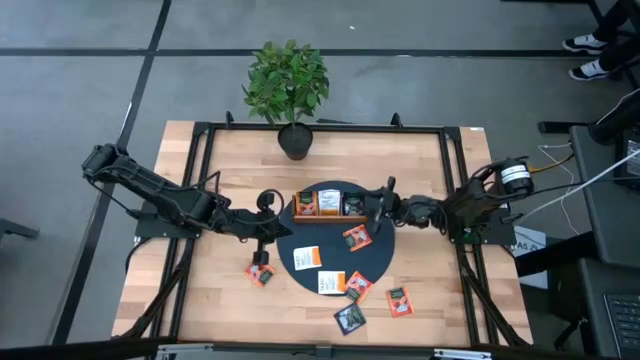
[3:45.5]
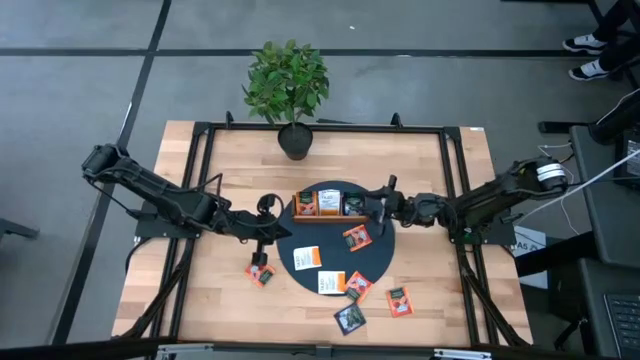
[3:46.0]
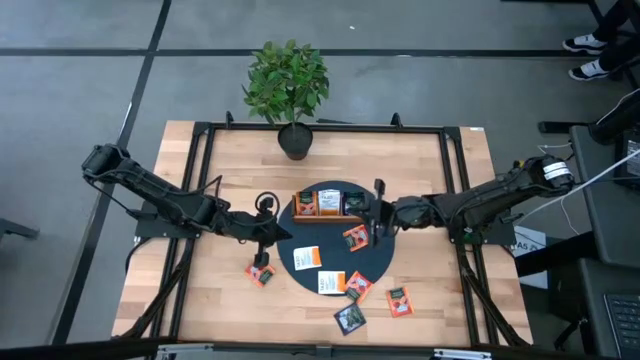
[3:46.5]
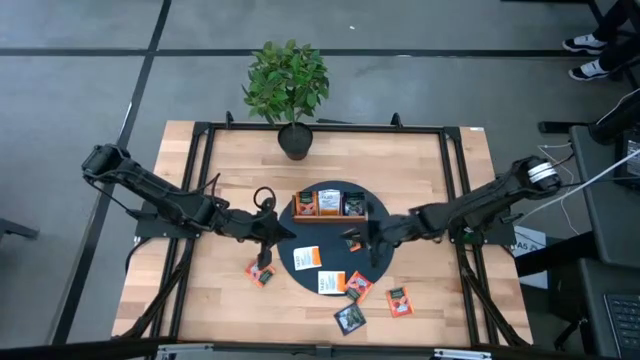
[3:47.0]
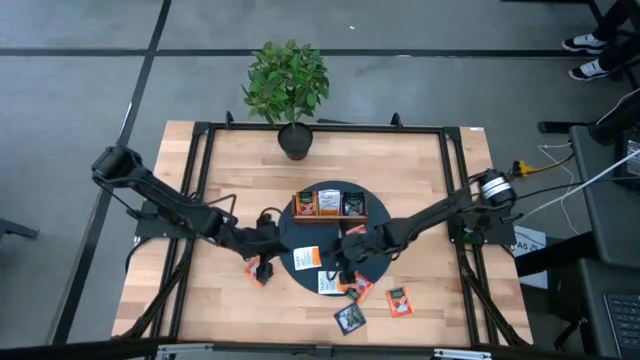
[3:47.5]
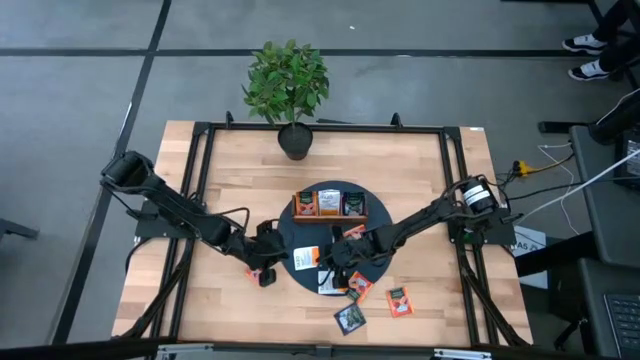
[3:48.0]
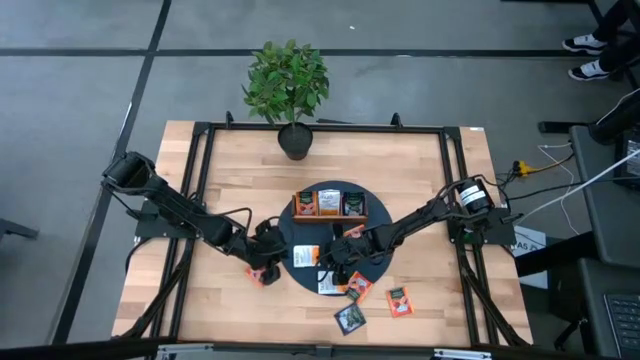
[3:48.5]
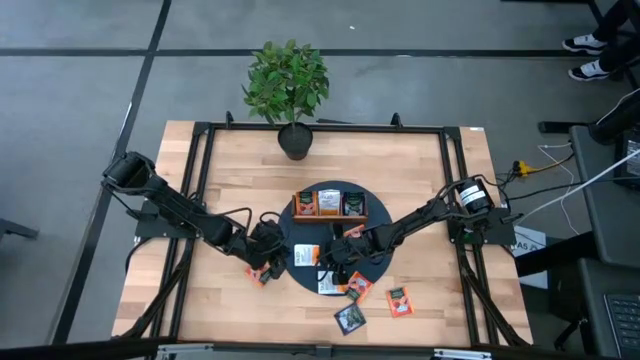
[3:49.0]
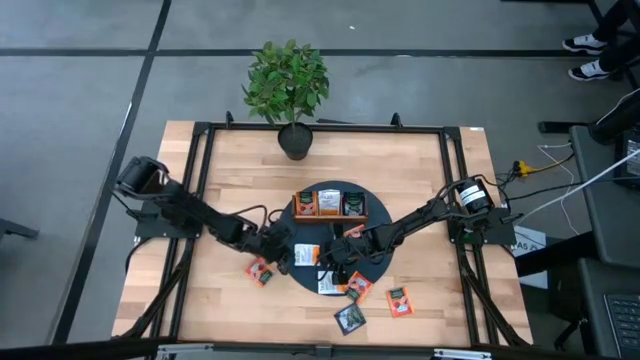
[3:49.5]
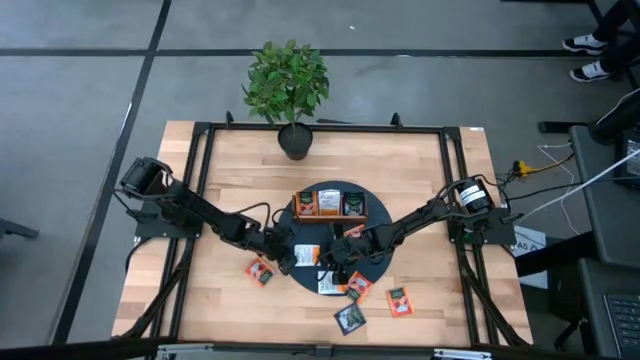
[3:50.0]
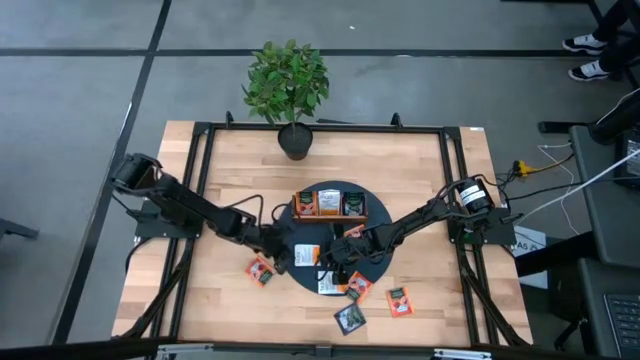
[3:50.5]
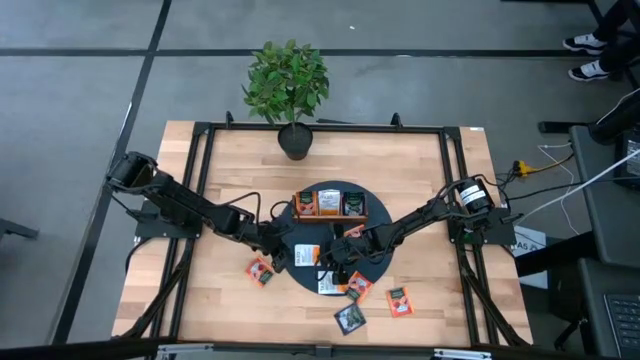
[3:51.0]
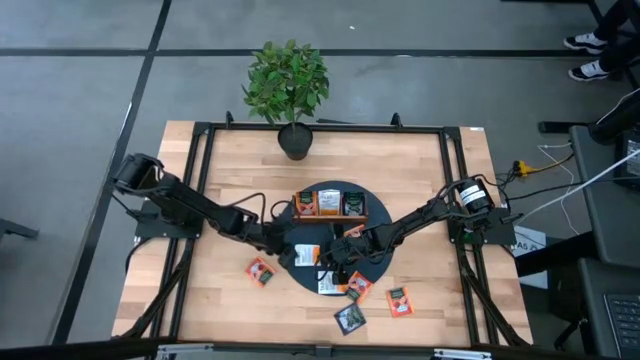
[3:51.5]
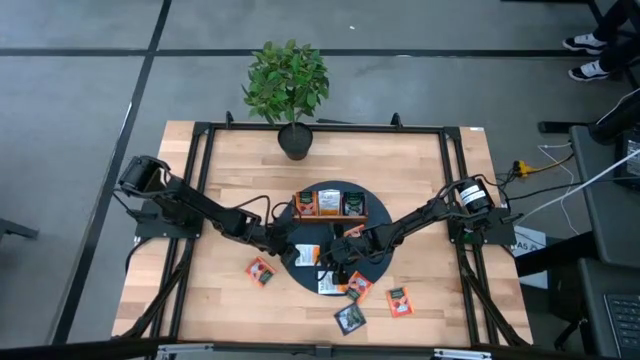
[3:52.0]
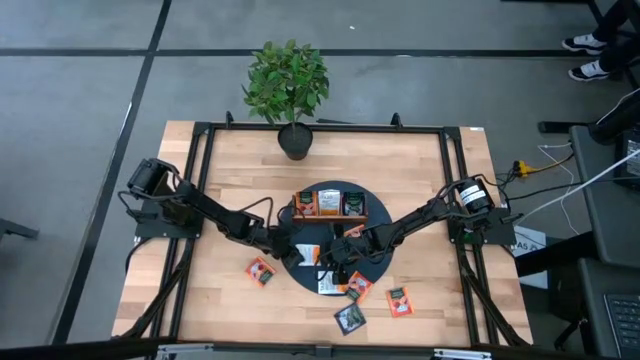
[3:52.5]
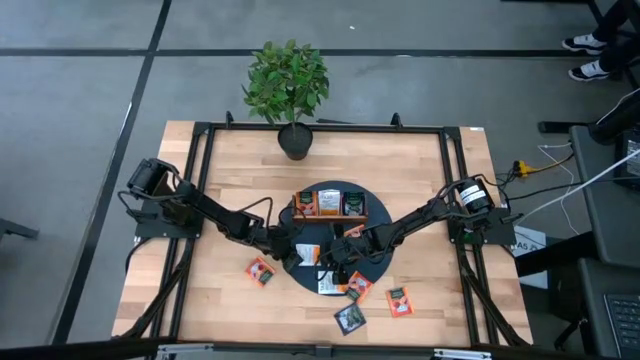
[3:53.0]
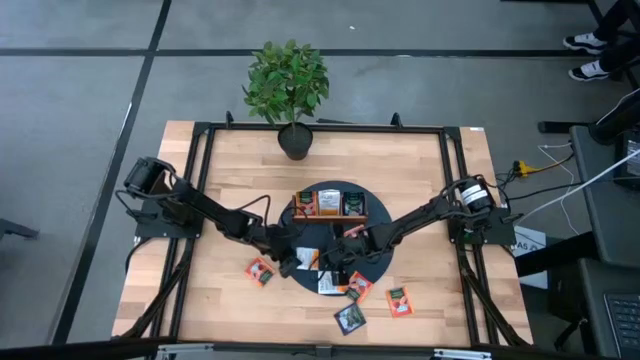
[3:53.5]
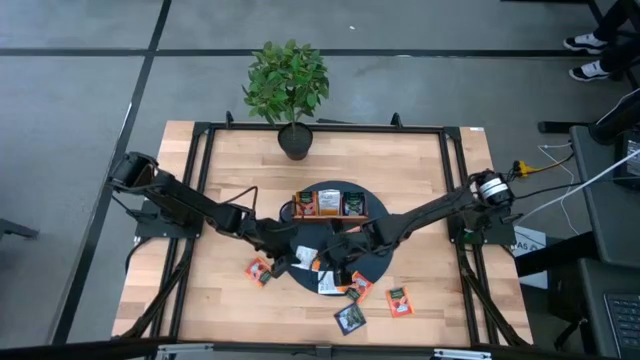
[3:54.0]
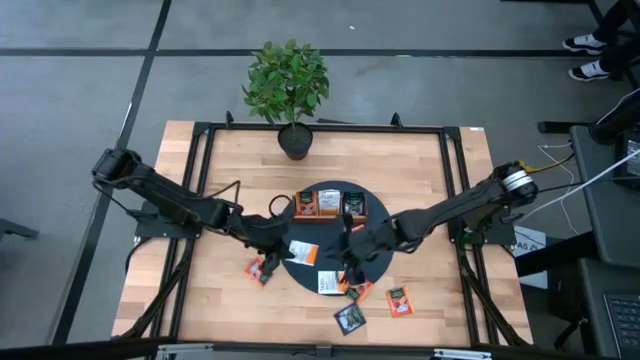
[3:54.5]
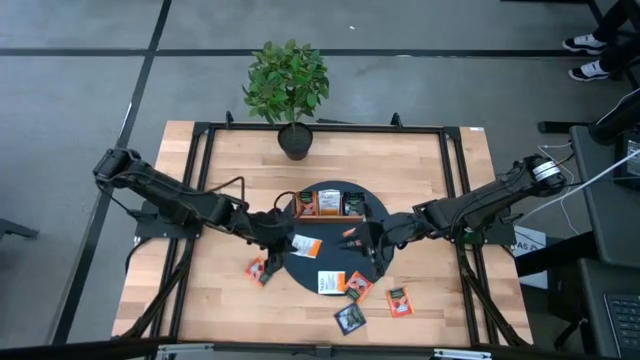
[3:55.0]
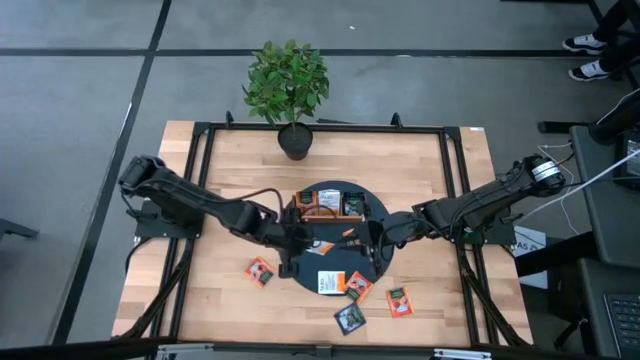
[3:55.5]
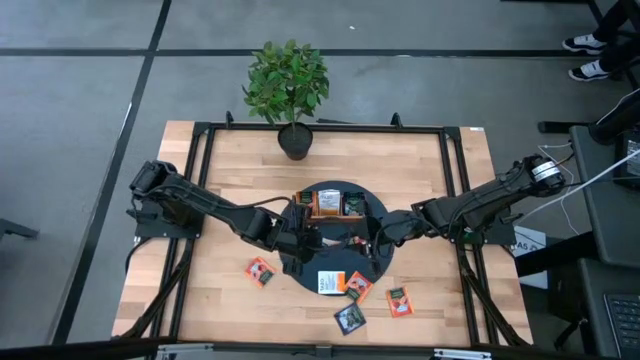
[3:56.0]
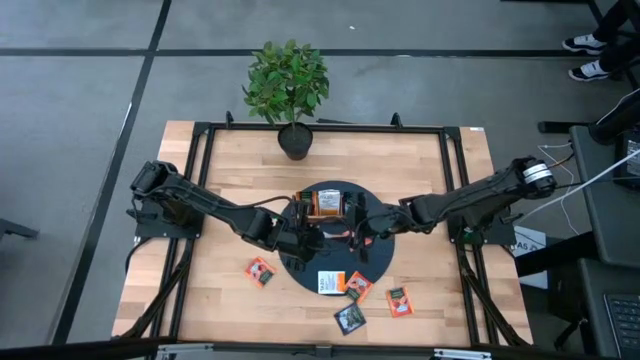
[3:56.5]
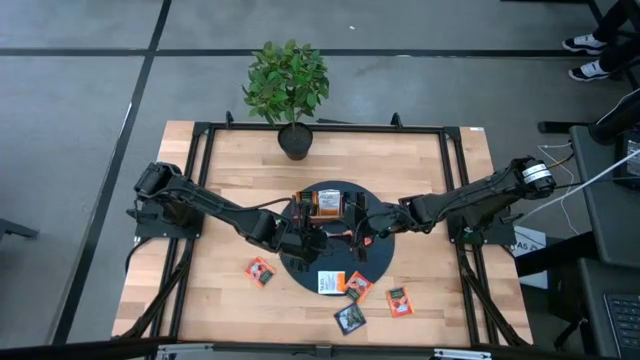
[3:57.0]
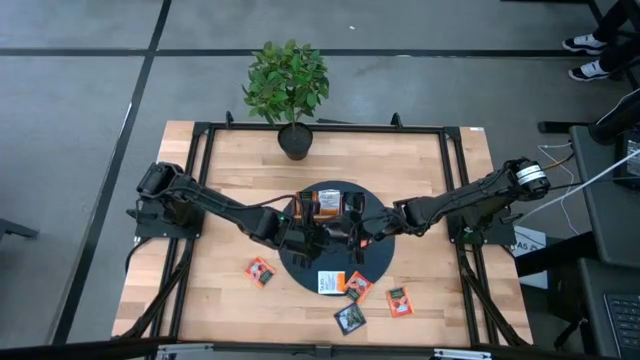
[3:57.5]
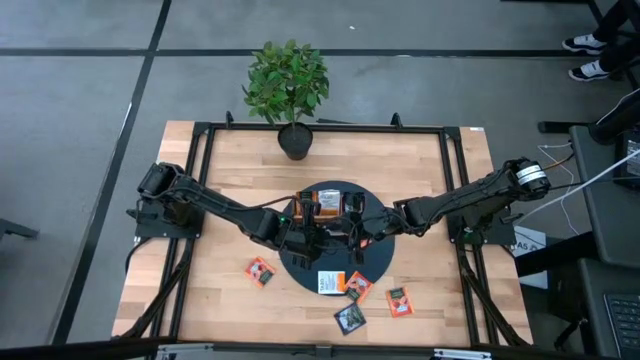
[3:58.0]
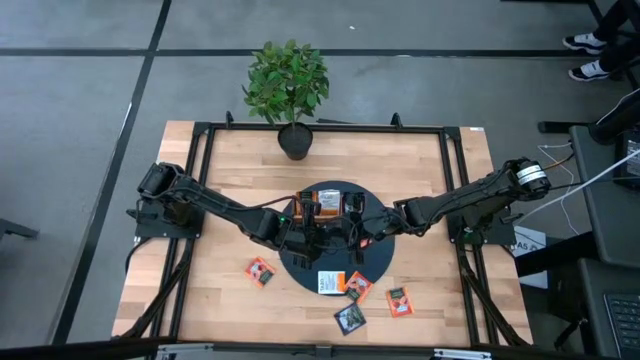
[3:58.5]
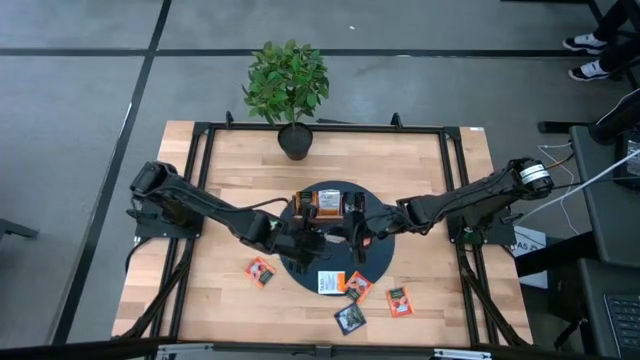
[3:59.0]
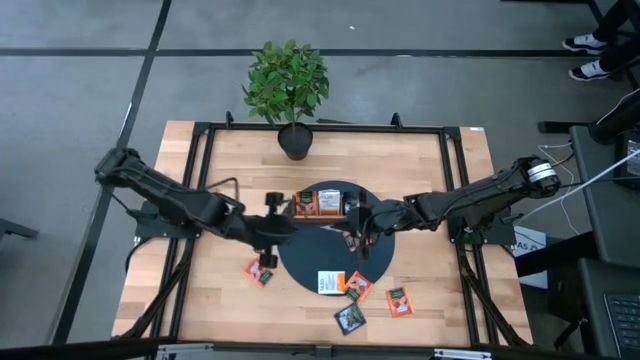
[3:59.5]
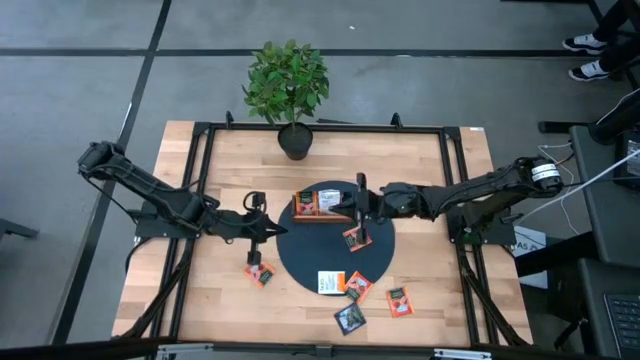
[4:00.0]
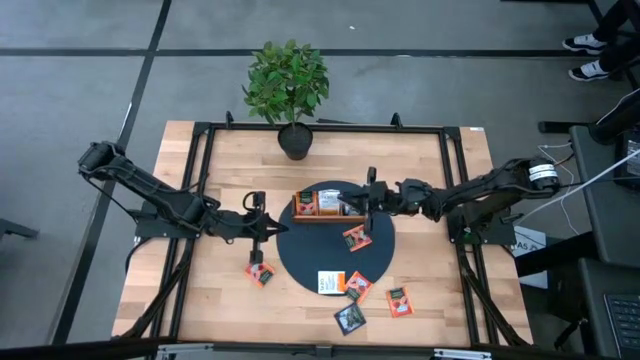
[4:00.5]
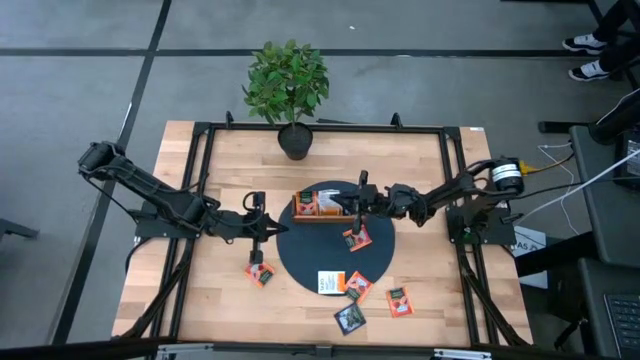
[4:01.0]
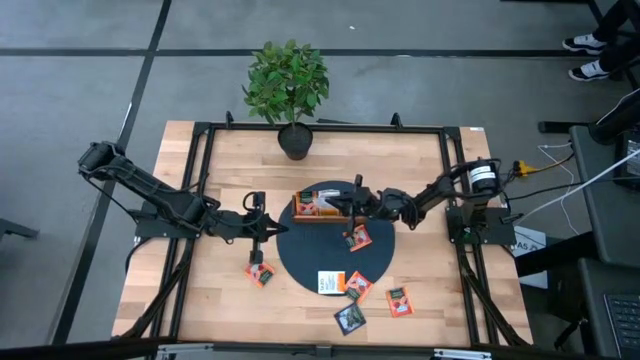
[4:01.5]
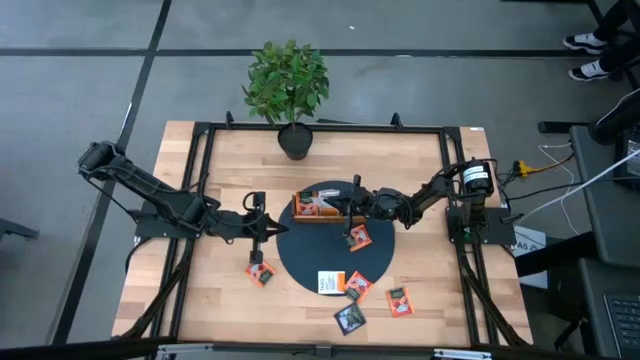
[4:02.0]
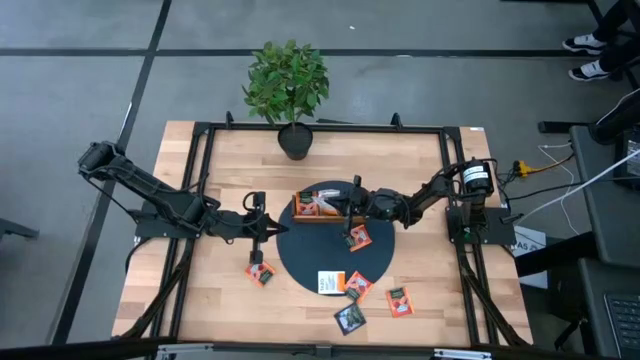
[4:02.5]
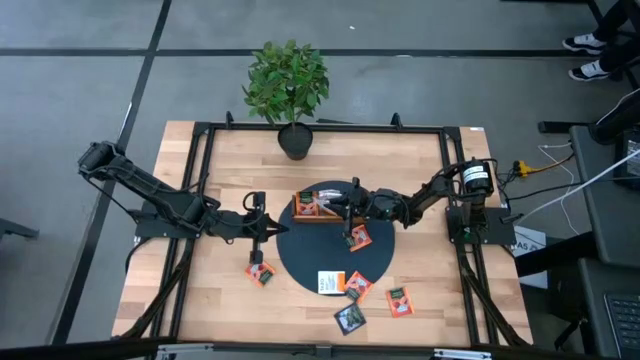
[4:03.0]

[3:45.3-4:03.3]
Task: Pick & Place Tea
Put the white tea bag into the middle of the wooden organizer

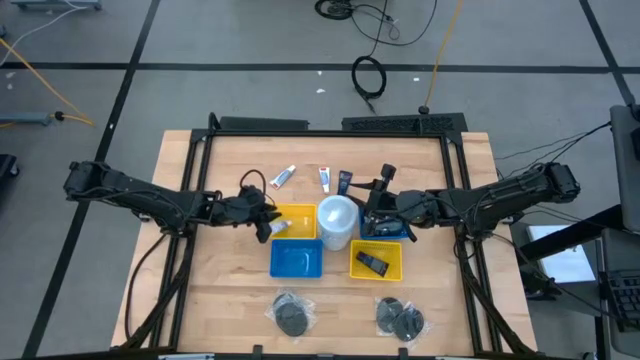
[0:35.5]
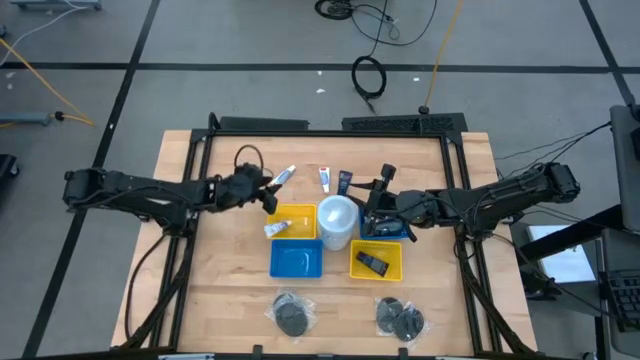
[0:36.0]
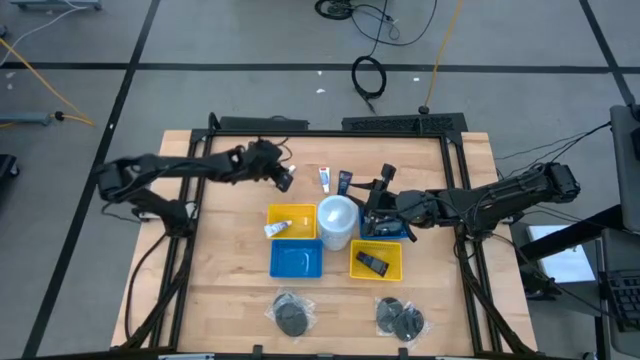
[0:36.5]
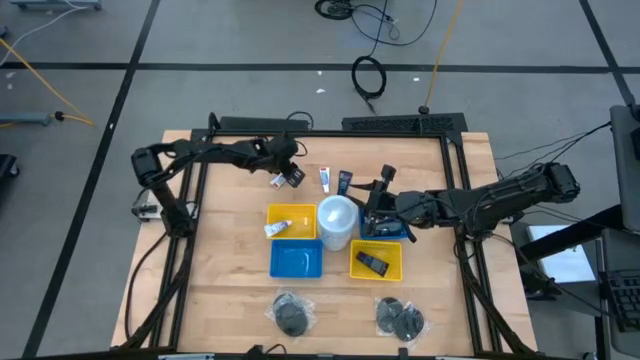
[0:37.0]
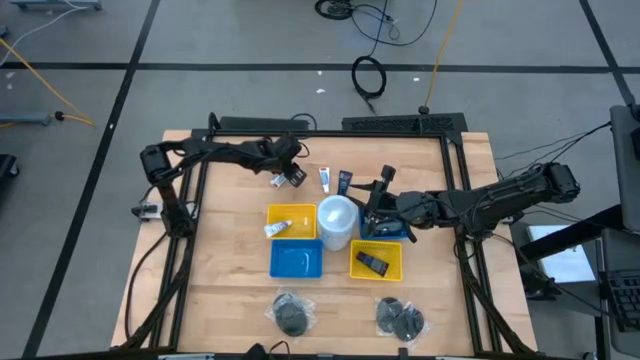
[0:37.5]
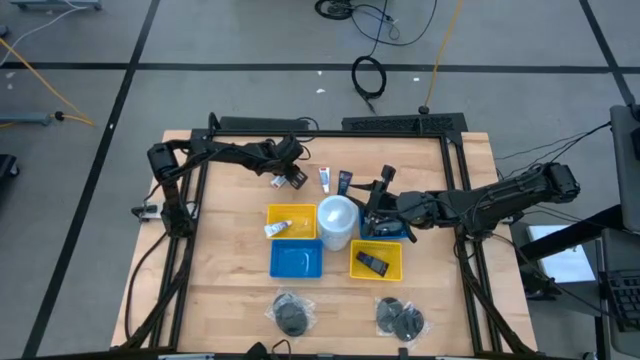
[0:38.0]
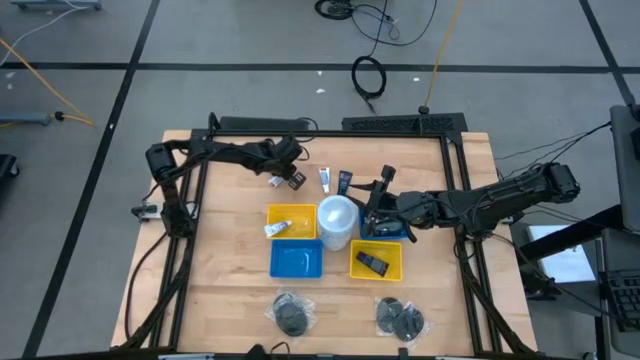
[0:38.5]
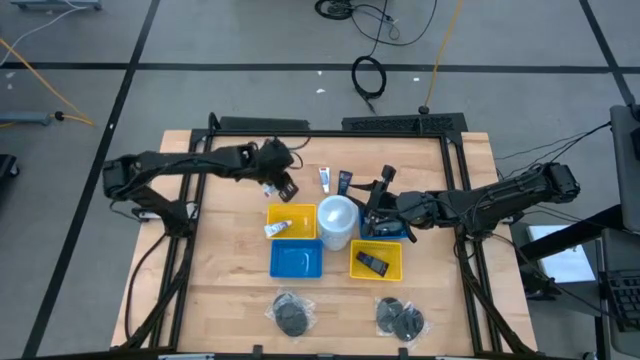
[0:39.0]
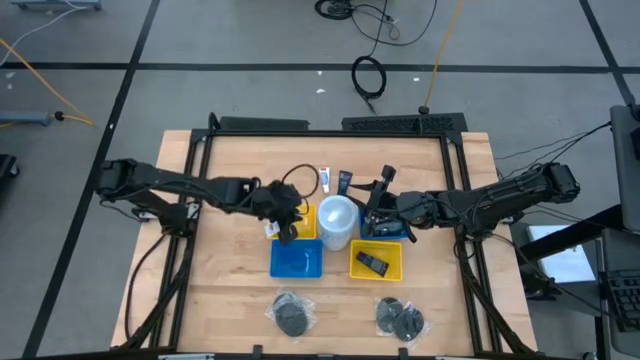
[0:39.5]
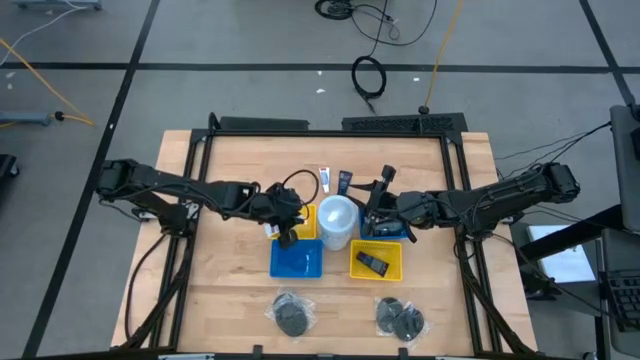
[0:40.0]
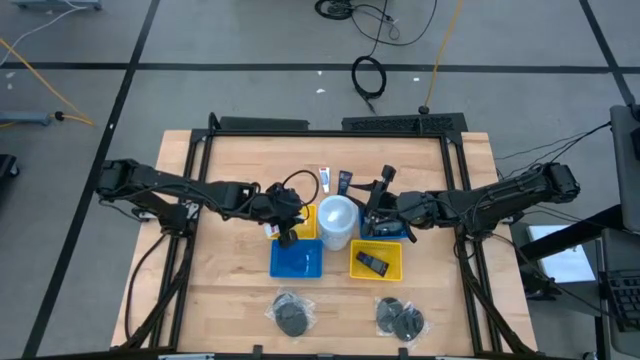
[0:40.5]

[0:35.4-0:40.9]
Task: Pick & Place Travel size toiletries
Put the white toothpaste into the top yellow bin
